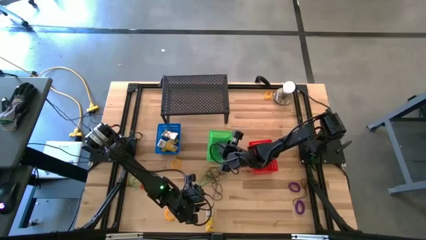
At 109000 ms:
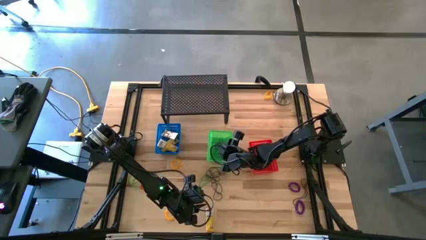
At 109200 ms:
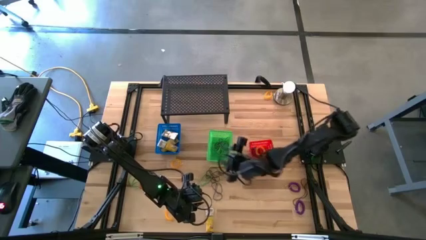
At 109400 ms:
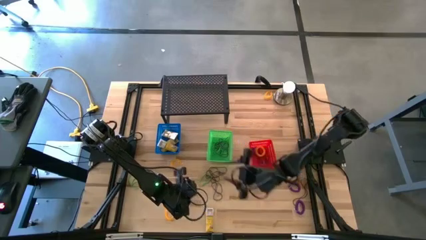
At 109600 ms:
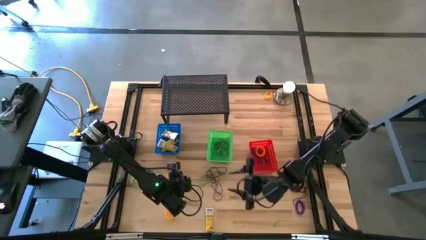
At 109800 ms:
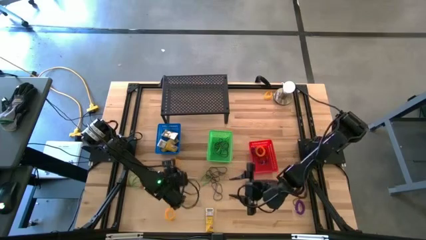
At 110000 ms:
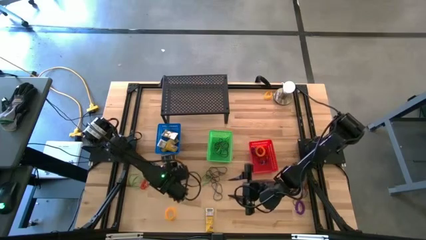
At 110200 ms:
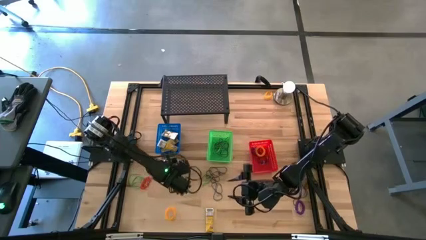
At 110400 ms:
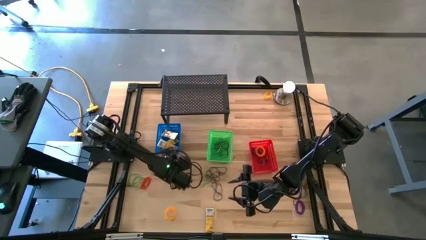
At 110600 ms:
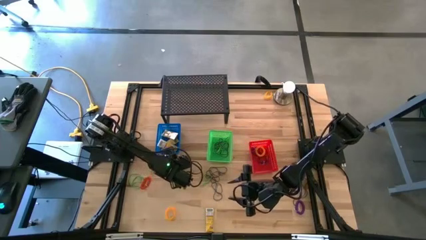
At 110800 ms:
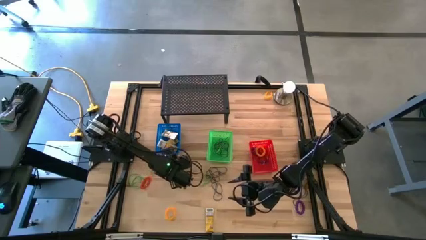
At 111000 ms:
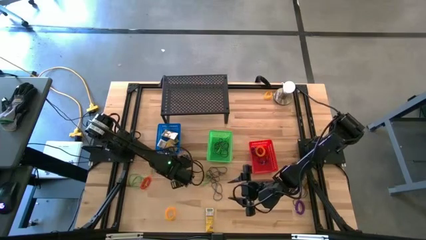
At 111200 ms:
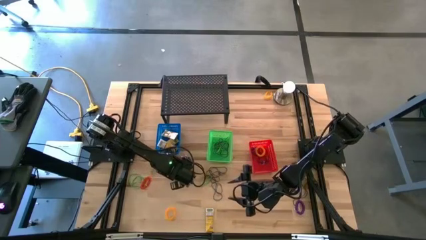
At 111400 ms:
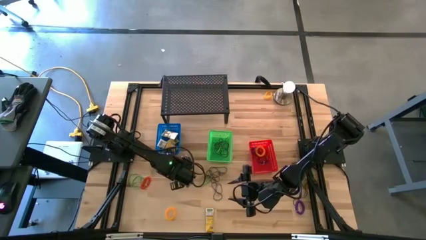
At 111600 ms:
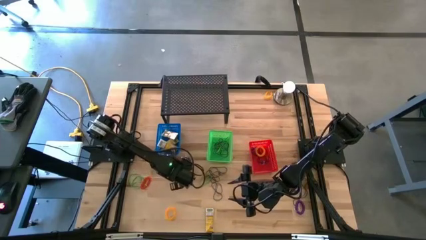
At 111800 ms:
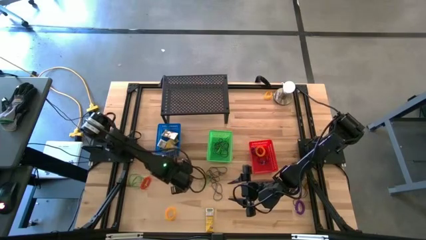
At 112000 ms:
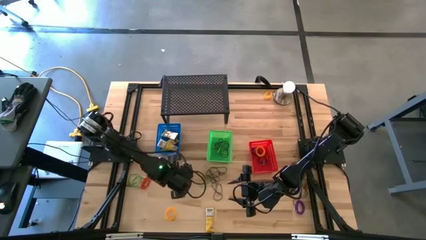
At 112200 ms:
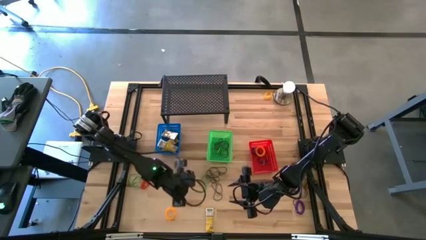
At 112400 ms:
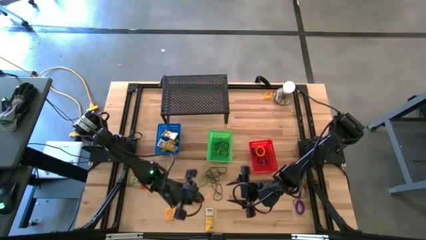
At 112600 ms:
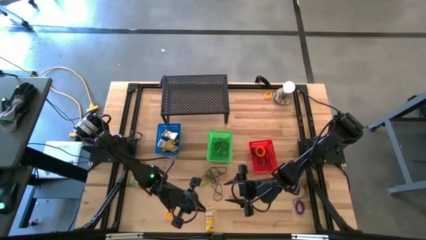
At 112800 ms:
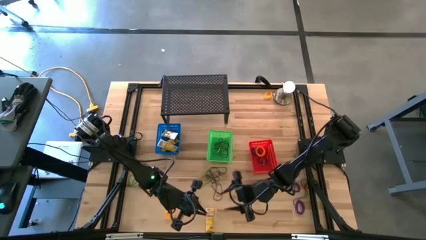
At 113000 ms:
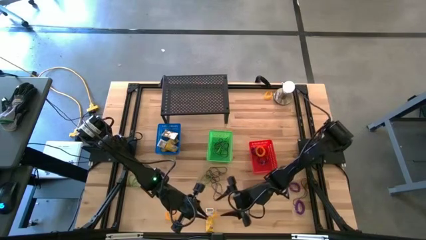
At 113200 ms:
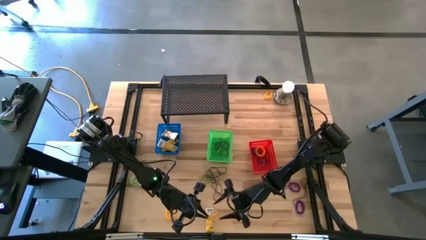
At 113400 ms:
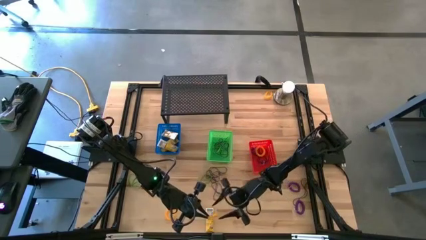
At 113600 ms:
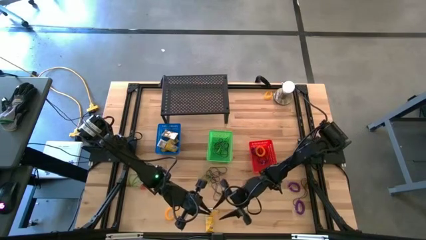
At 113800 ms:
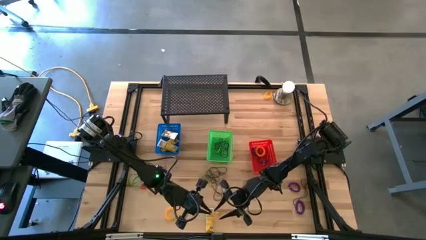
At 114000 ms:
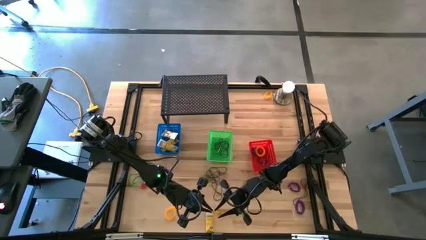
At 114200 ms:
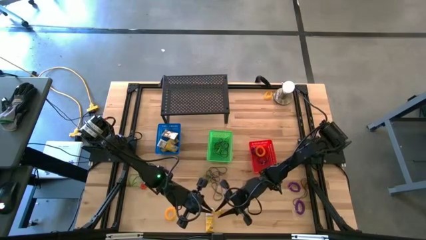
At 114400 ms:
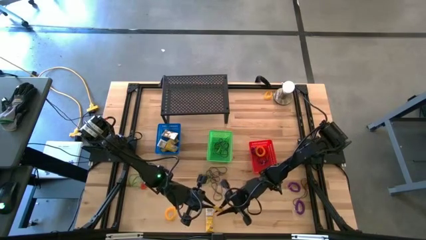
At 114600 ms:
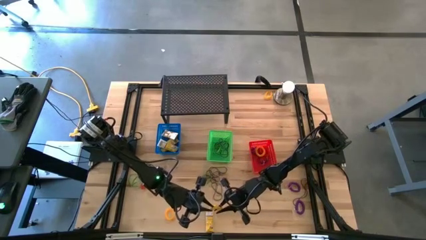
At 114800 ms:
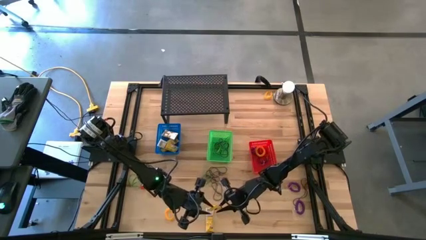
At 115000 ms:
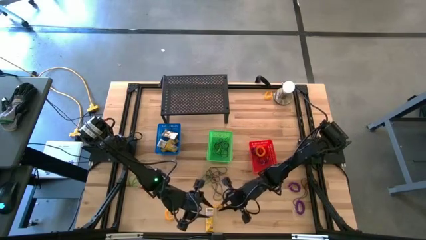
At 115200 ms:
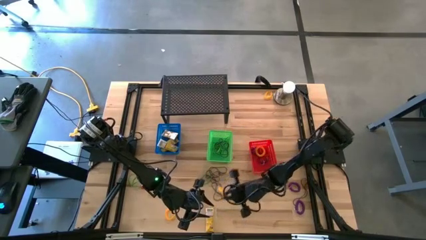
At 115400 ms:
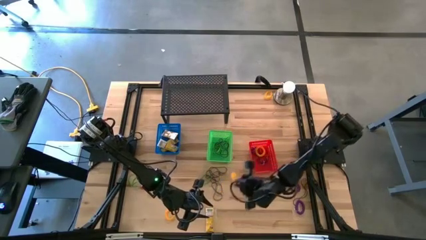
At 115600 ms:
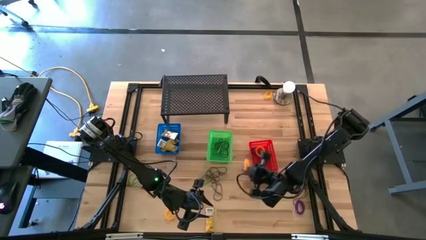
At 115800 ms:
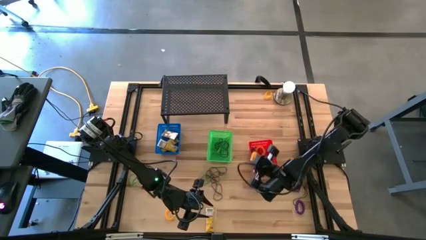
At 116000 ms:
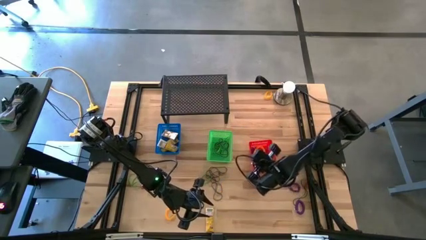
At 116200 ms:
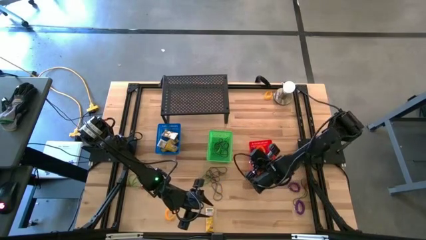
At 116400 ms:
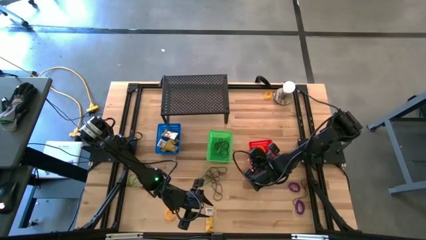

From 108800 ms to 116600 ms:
Task: Pick & Place Office Desk Supplies
Put the yellow spring keychain into the red bin

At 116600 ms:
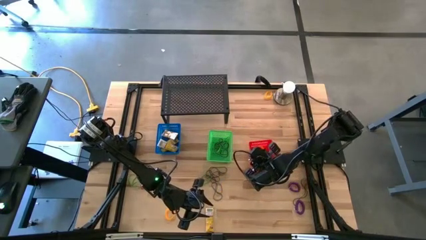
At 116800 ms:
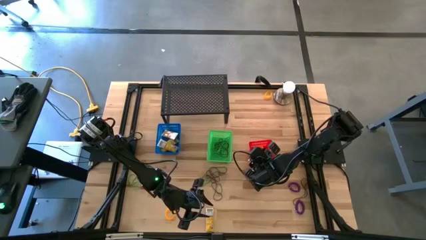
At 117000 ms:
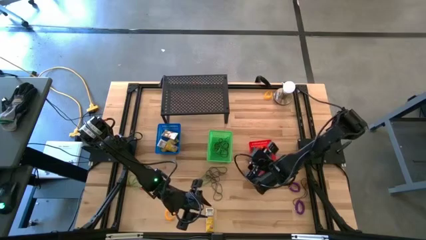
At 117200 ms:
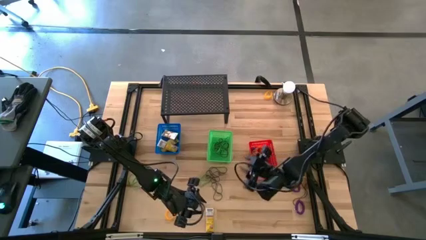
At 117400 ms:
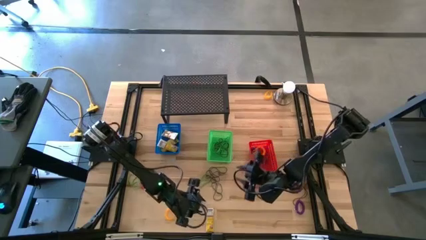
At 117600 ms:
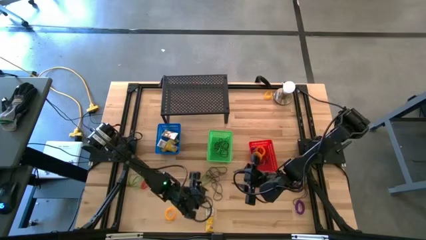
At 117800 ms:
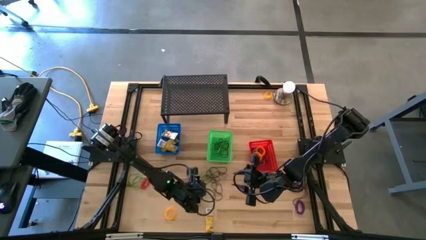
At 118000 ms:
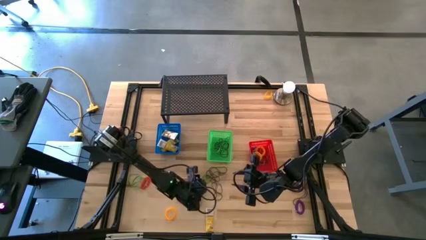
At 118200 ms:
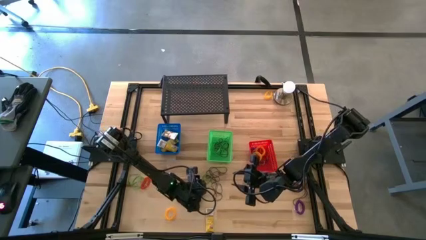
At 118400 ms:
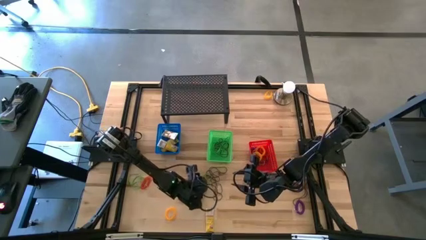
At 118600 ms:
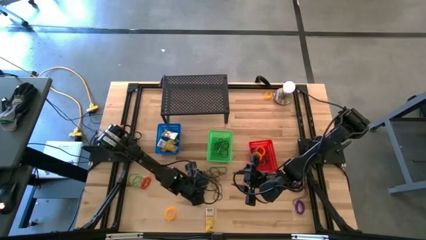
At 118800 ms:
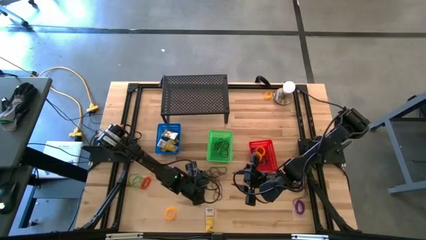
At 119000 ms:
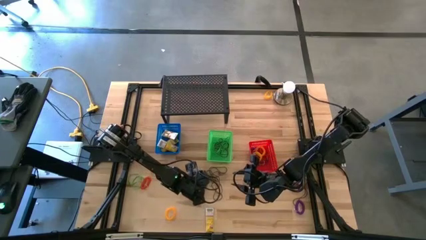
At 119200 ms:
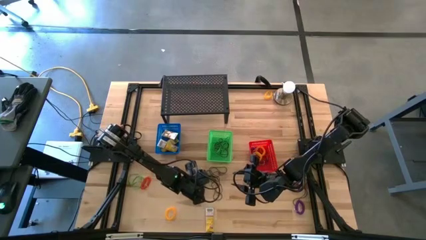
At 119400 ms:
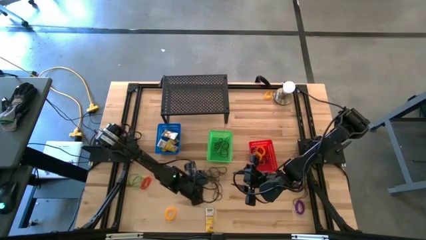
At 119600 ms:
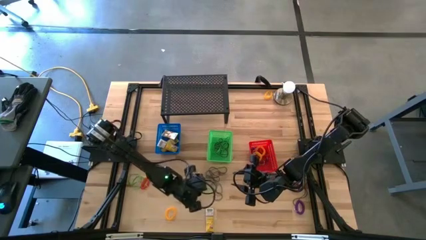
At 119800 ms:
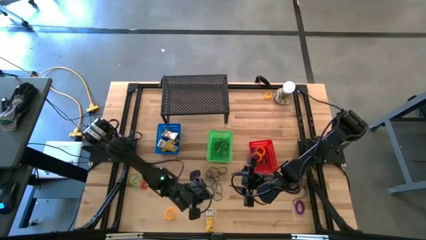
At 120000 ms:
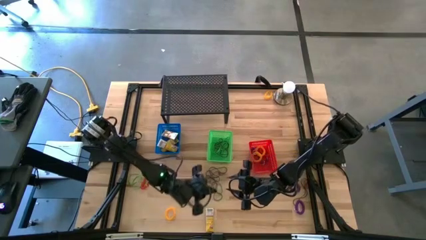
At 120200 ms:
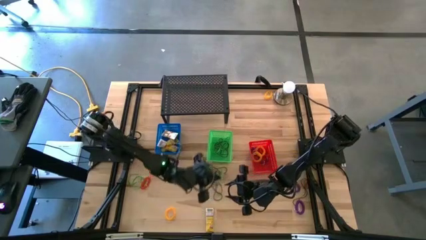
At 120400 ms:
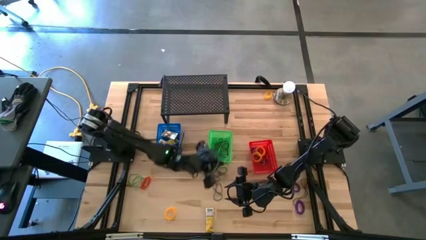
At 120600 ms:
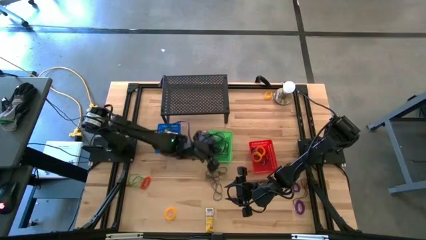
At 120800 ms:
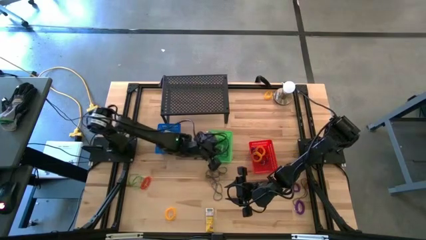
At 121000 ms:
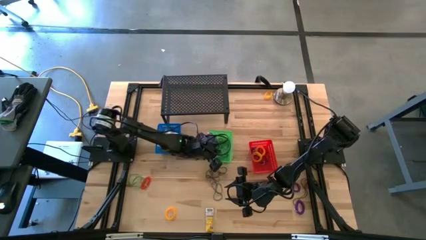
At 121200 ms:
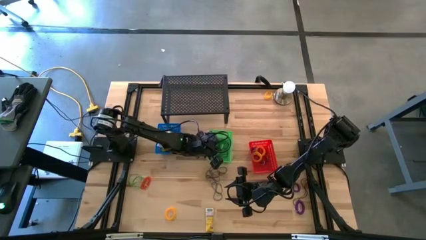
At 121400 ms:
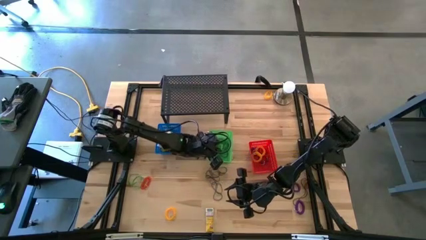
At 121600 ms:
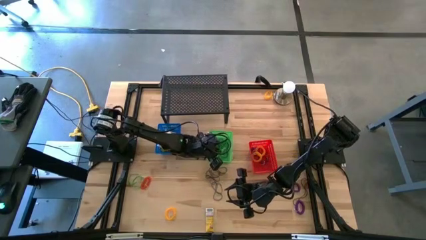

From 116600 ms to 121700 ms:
Put the green rubber band into the green bin

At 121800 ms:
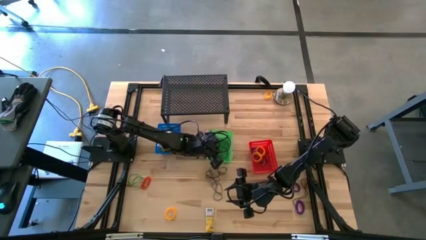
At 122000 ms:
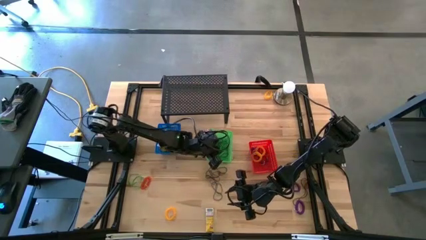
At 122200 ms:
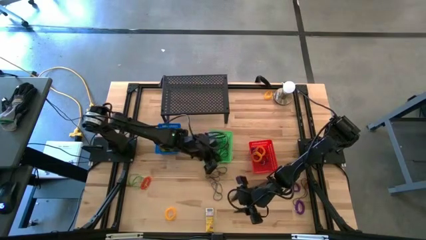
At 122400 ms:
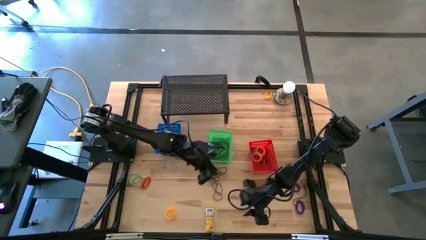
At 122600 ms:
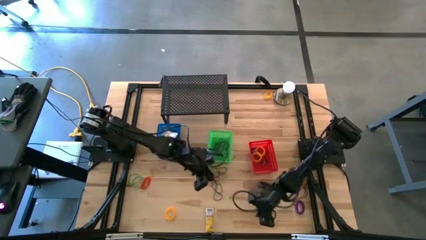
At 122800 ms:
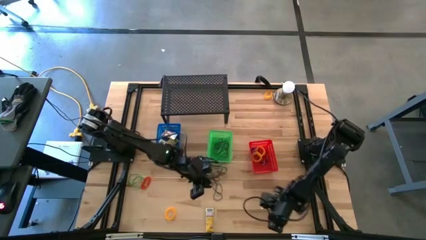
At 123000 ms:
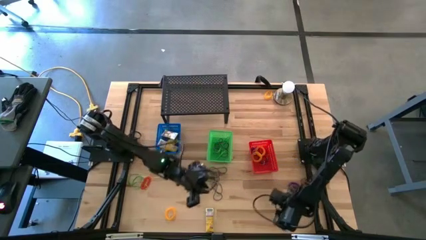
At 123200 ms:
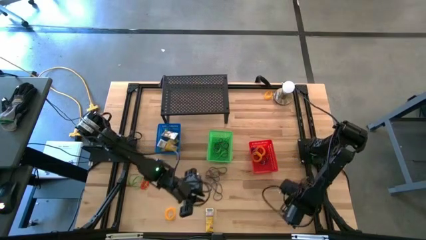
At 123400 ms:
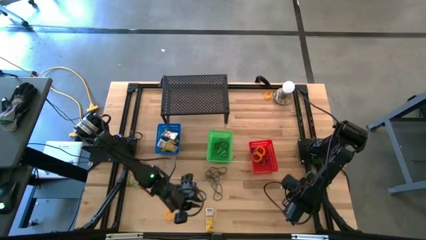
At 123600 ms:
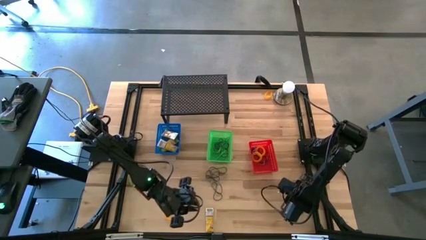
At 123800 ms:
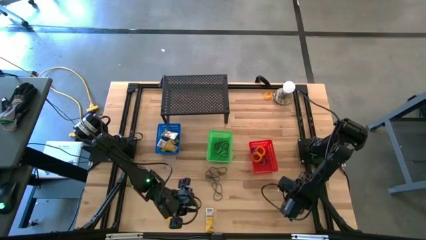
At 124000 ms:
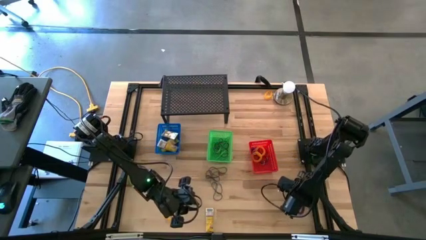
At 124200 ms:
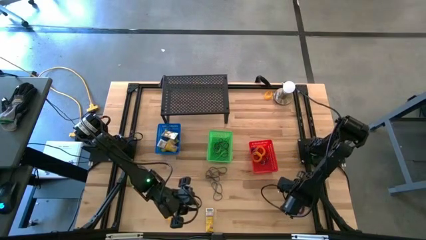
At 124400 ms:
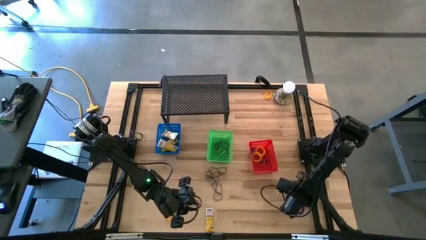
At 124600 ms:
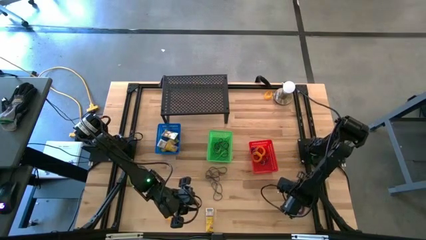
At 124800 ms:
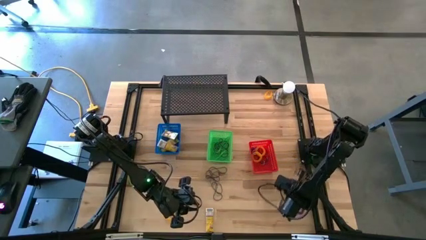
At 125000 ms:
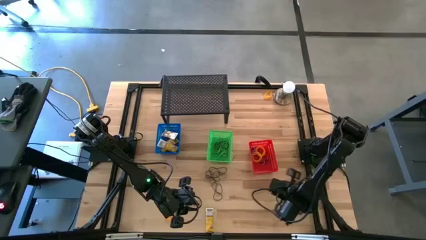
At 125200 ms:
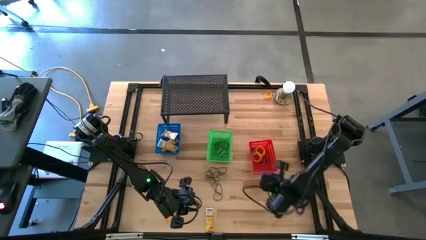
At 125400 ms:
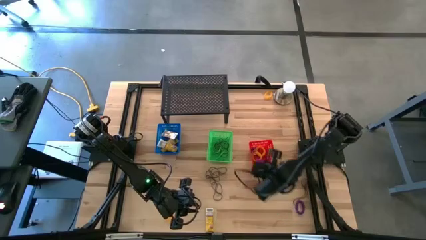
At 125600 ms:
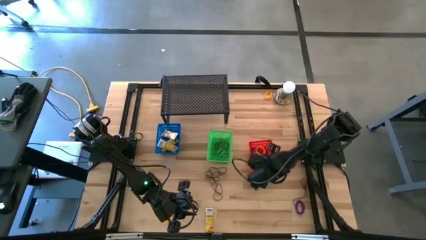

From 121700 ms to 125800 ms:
Put the violet spring keychain into the red bin
